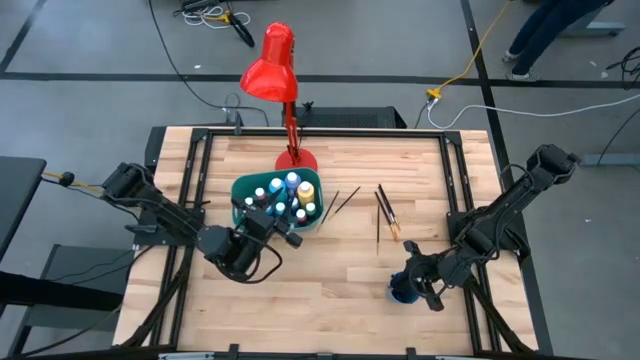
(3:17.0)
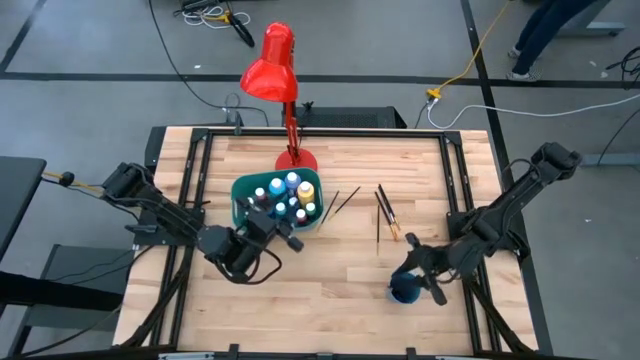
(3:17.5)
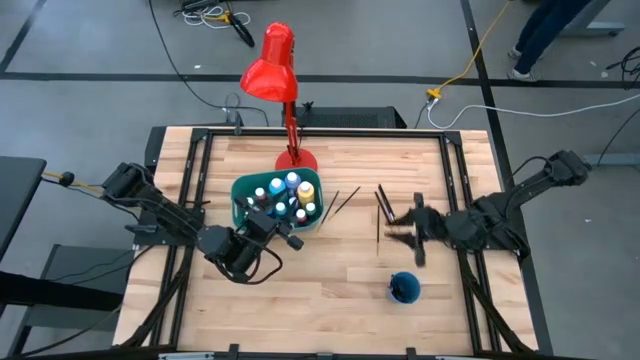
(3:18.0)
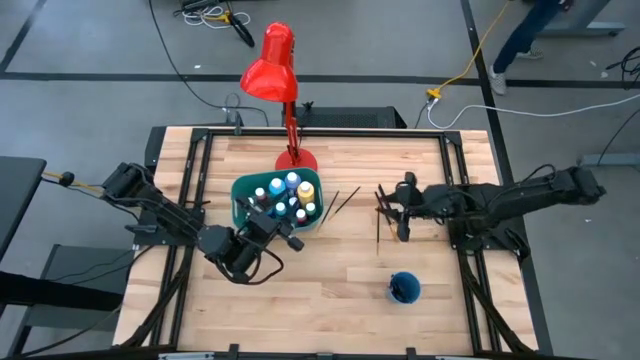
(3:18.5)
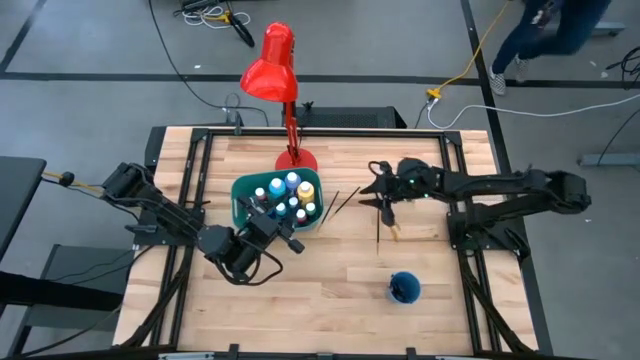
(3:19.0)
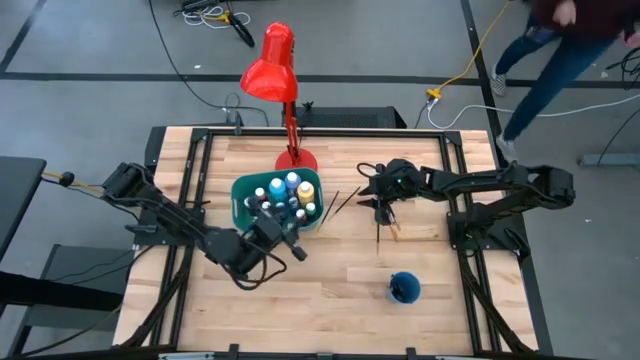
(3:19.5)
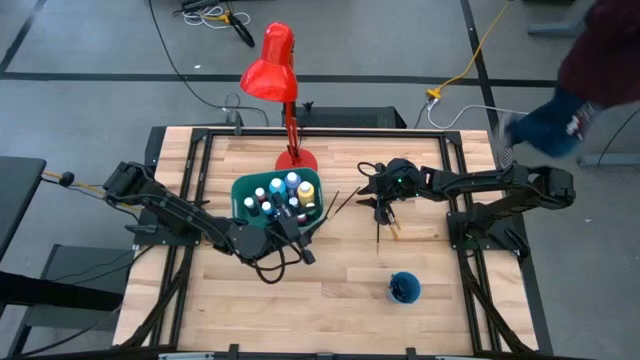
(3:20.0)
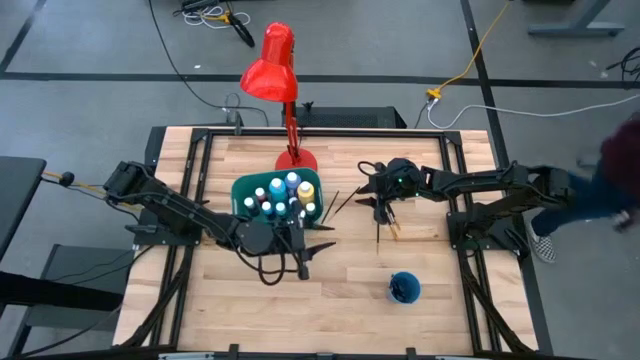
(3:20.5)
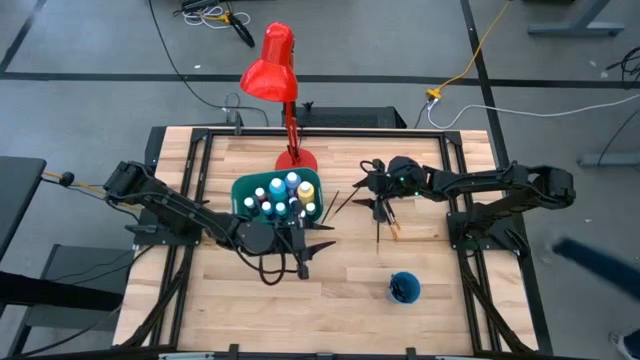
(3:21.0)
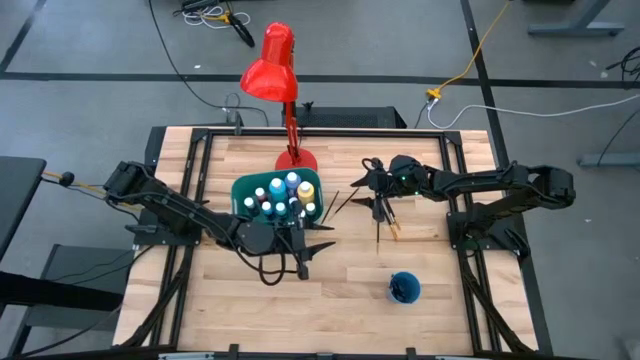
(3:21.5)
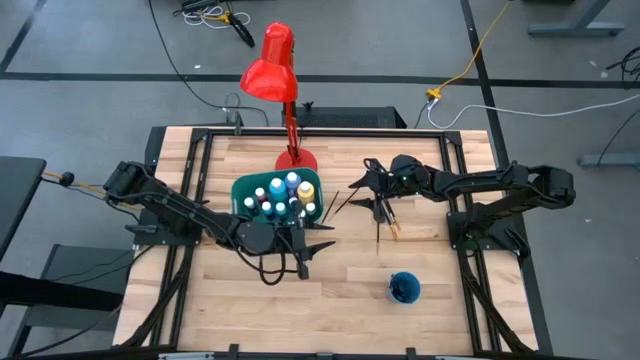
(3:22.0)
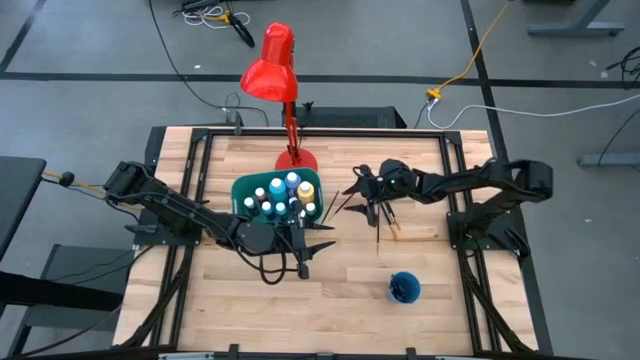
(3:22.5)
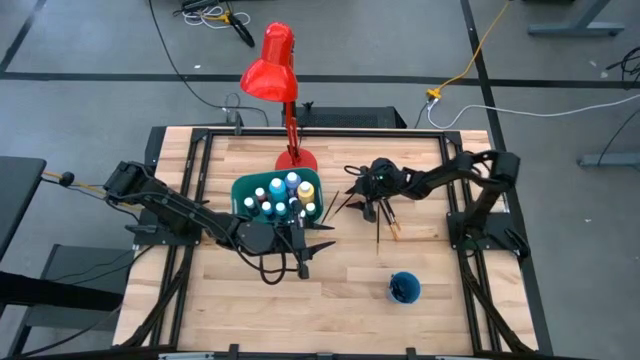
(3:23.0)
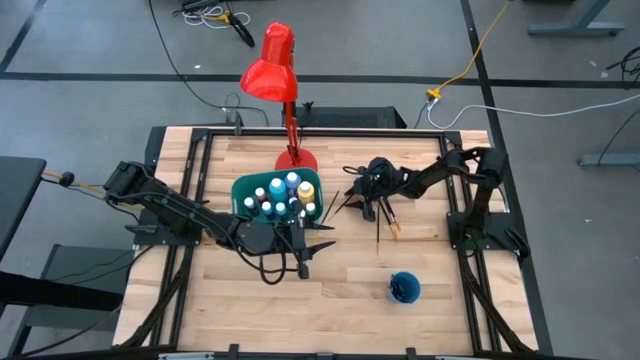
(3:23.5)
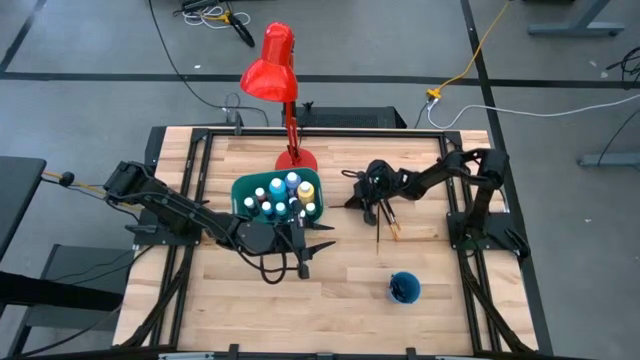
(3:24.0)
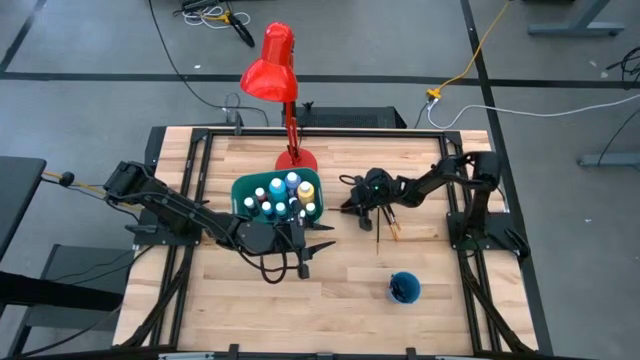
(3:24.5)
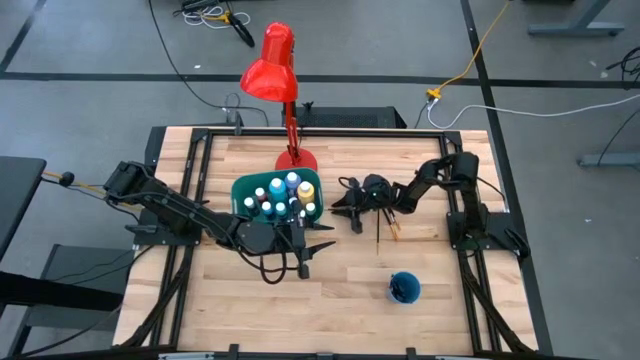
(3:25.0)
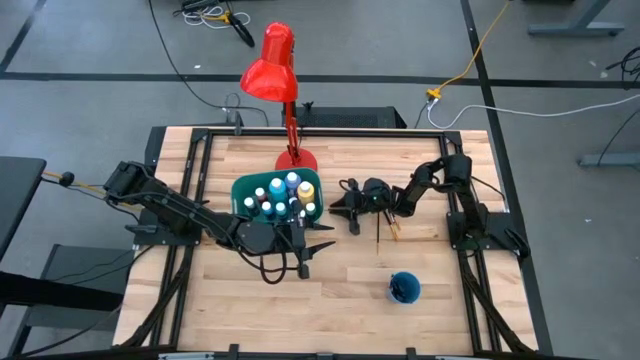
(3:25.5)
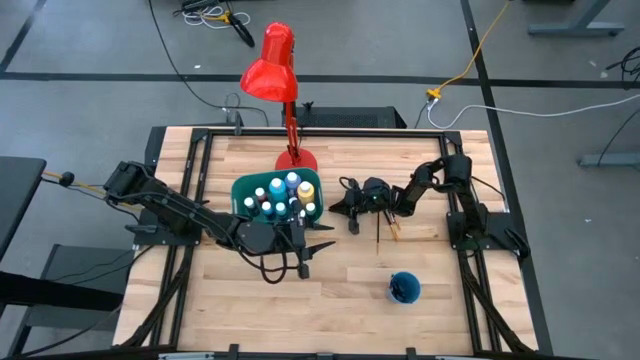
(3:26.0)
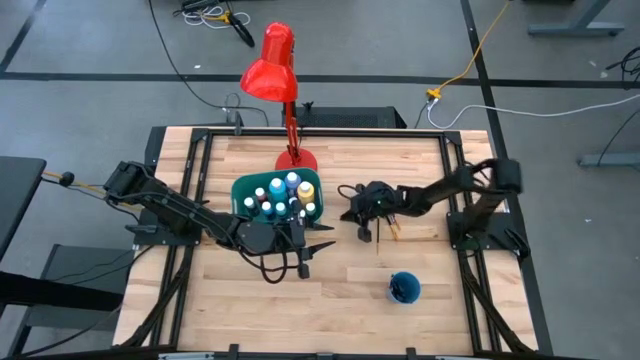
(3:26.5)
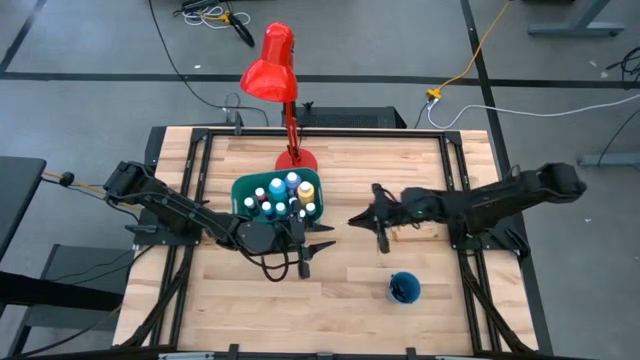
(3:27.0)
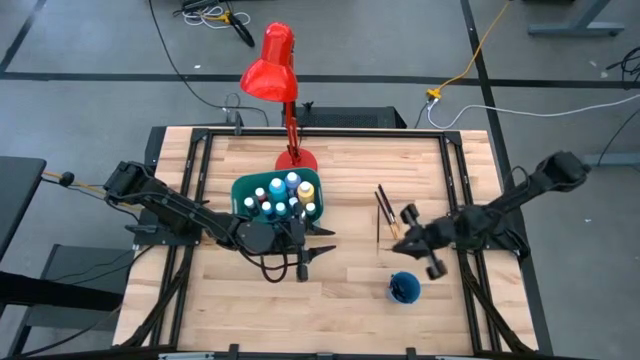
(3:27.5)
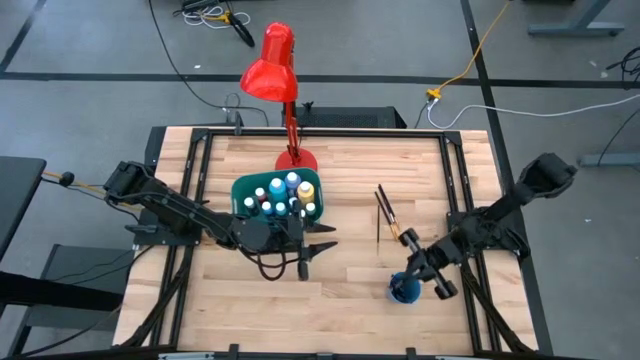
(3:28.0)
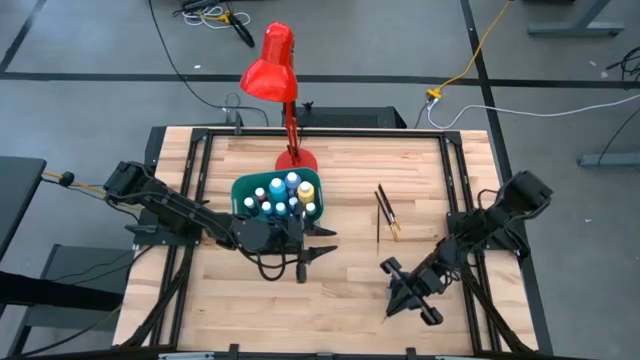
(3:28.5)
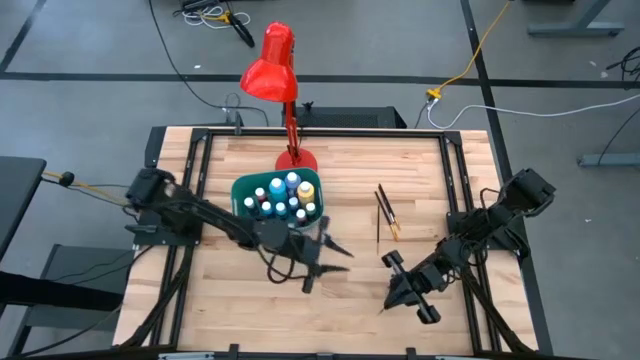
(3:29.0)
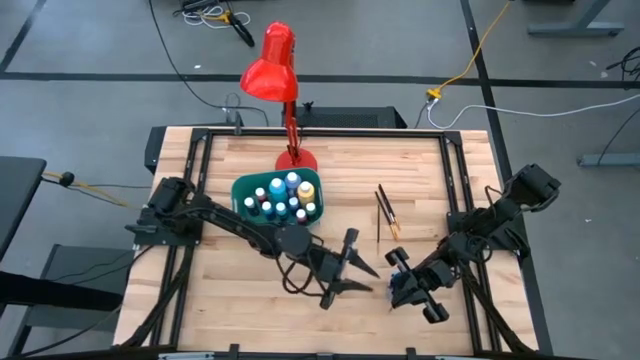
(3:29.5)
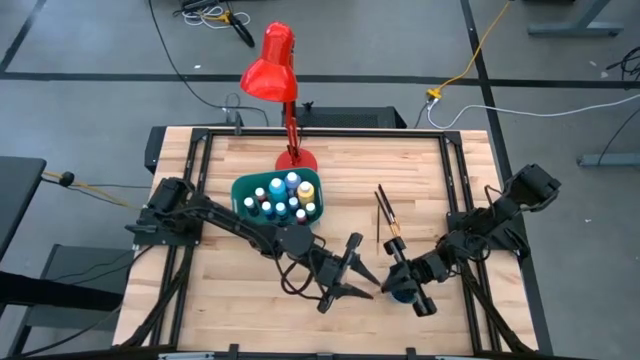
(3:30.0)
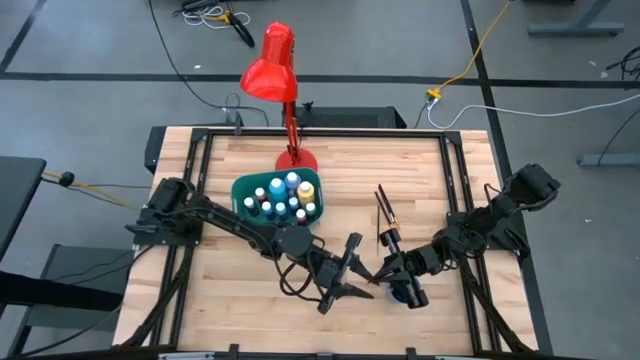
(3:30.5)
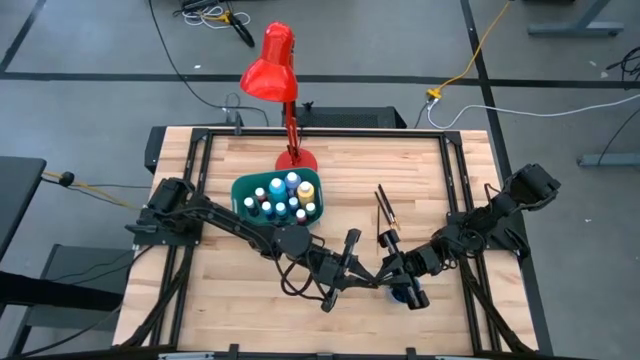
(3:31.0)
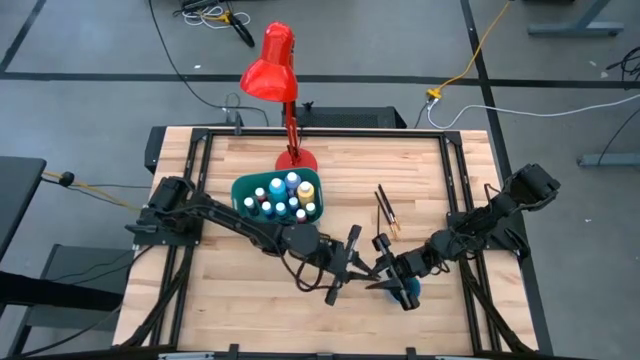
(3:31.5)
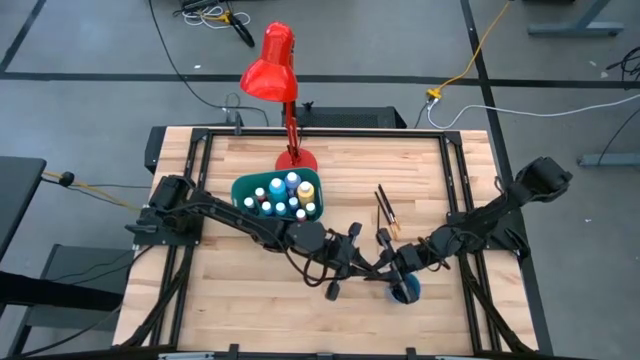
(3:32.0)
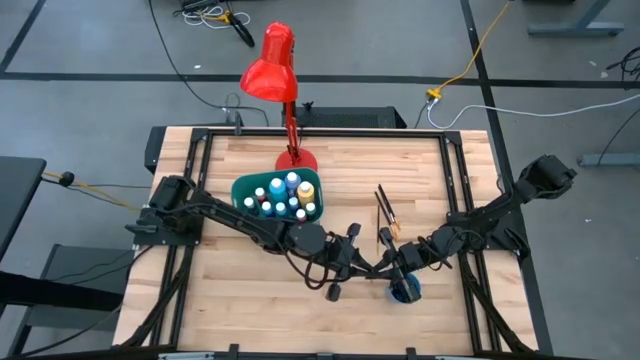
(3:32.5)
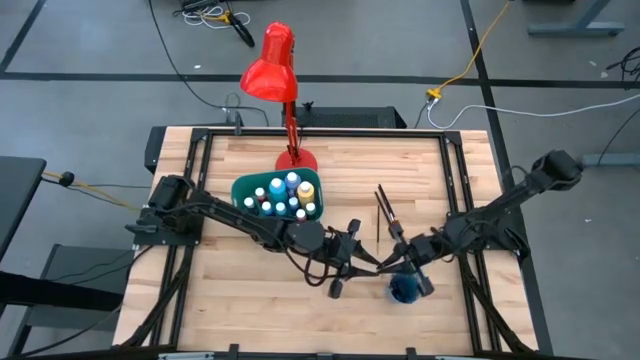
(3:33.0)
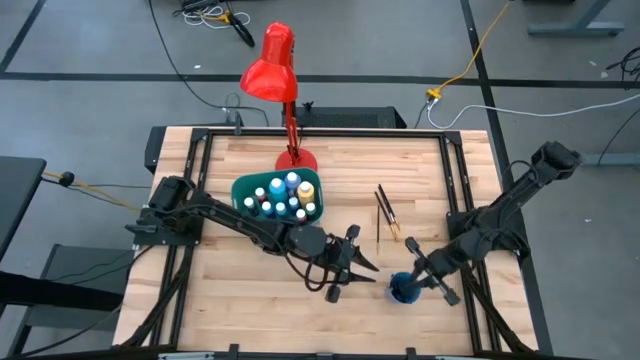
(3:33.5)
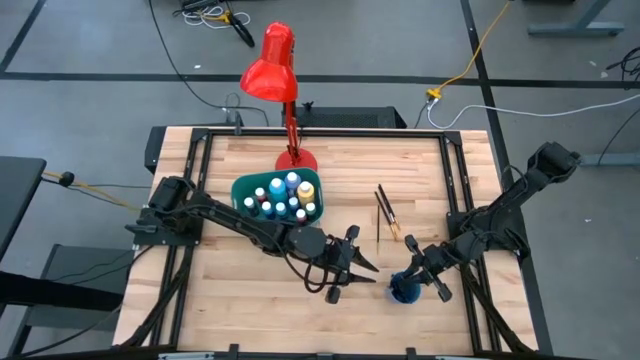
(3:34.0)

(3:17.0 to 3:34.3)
Task: Pick & Place Paint Supplies
Put the gold paint brush into the blue cup

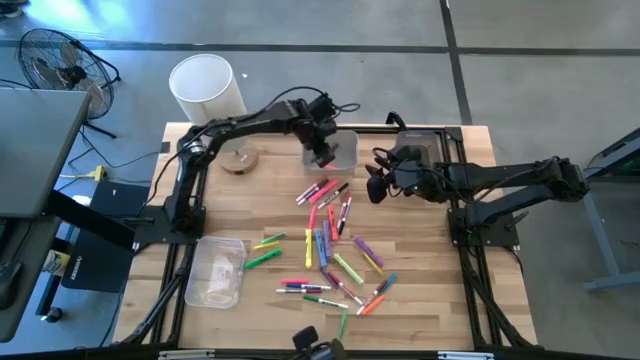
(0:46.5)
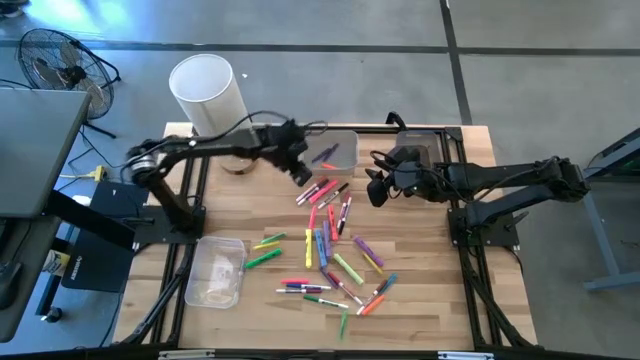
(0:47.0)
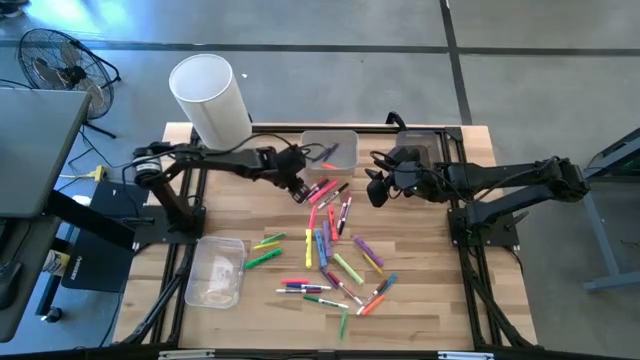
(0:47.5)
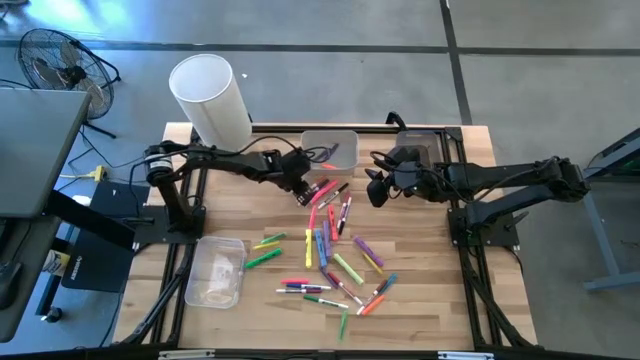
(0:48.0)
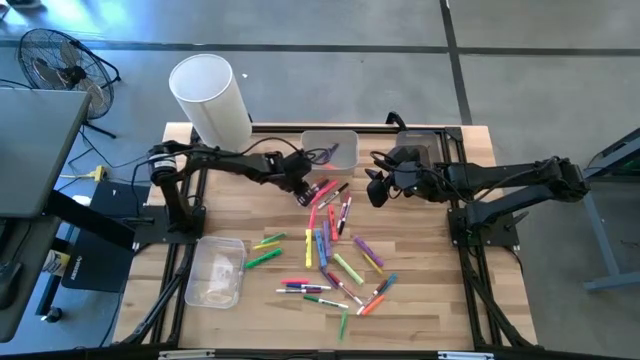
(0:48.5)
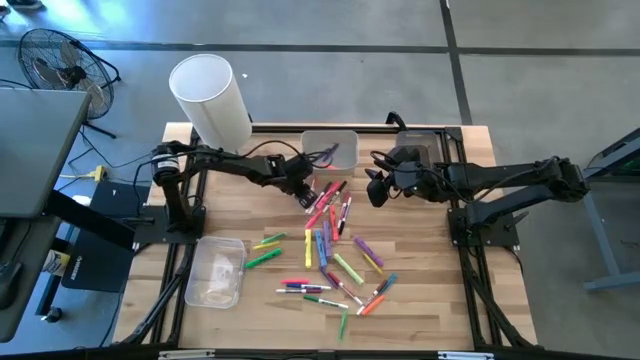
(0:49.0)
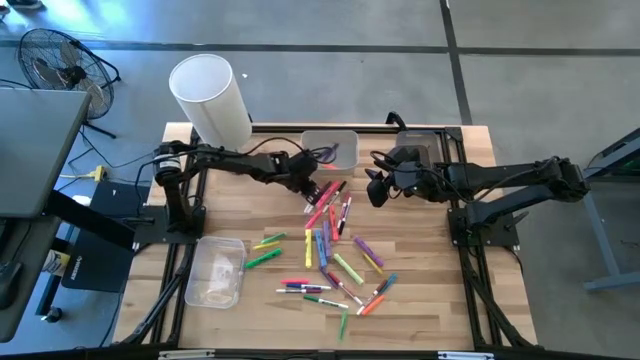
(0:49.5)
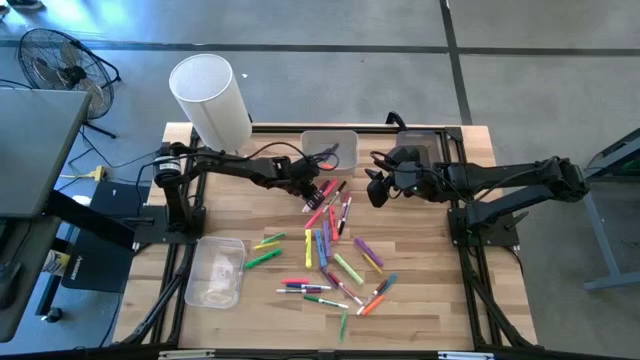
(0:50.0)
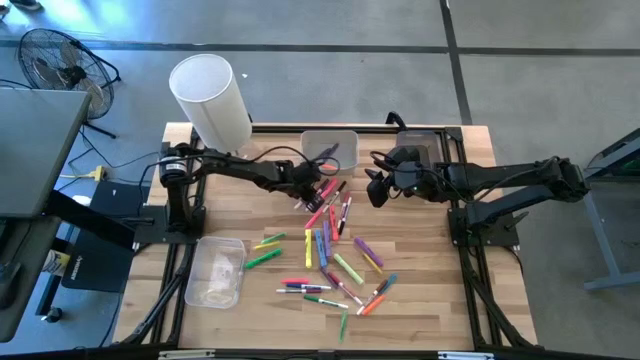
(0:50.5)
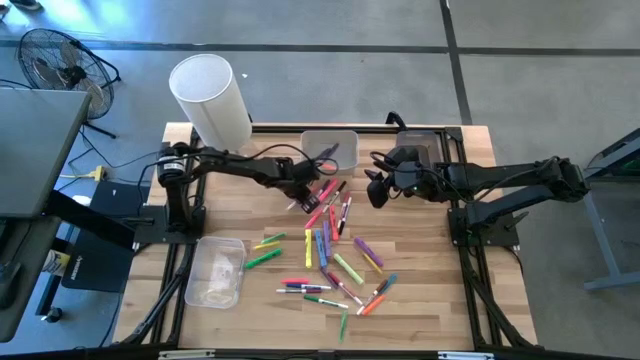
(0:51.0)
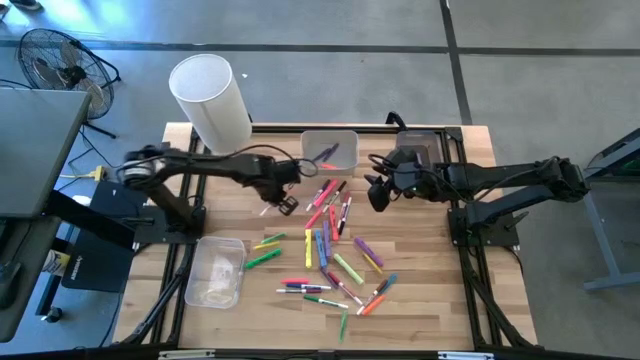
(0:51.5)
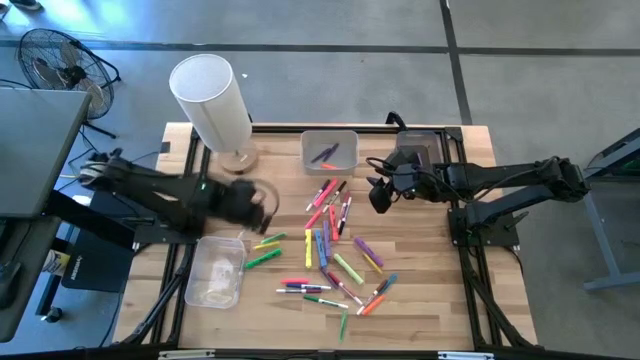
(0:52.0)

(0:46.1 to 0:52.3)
Task: Pick & Place Markers
Put the orange marker pen into the transparent bin
